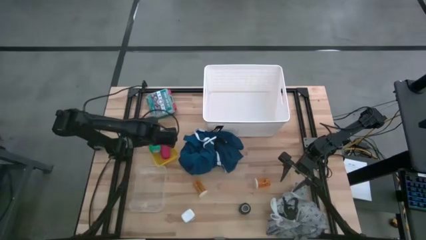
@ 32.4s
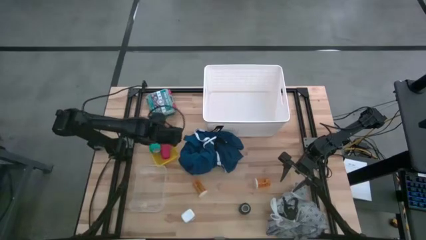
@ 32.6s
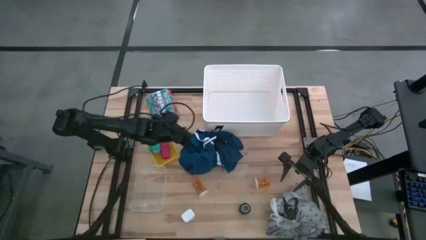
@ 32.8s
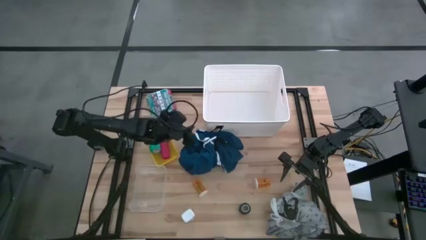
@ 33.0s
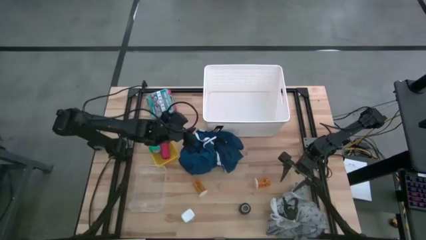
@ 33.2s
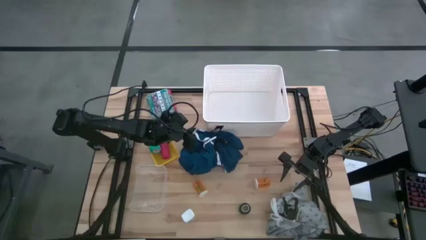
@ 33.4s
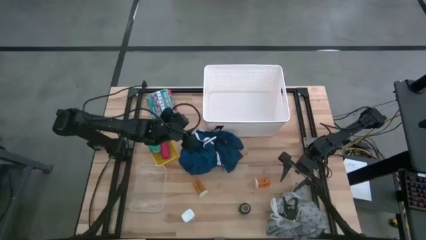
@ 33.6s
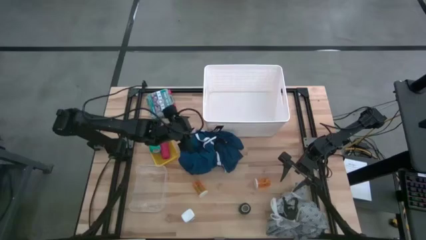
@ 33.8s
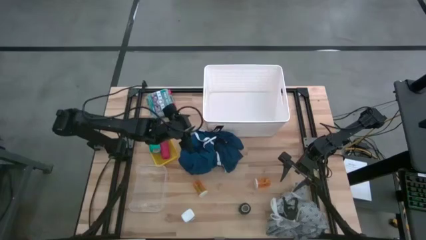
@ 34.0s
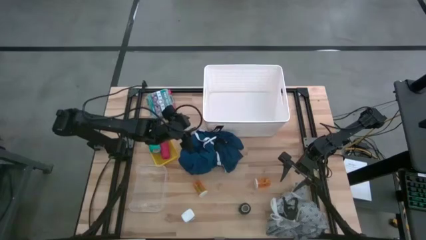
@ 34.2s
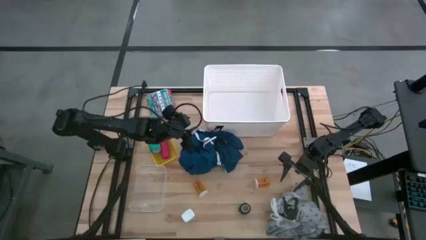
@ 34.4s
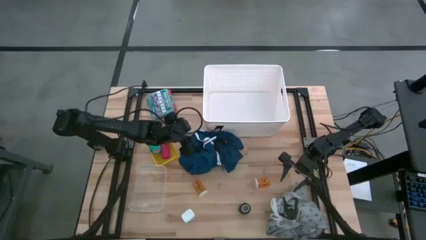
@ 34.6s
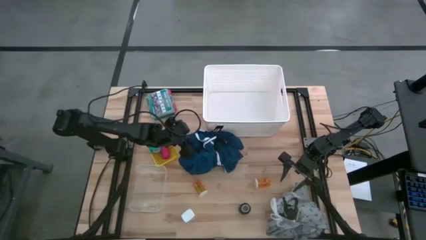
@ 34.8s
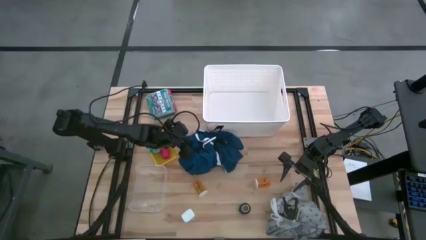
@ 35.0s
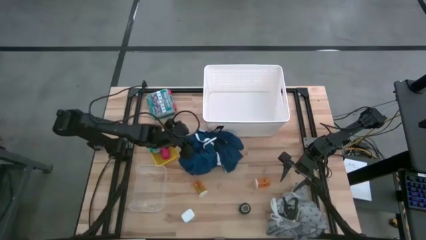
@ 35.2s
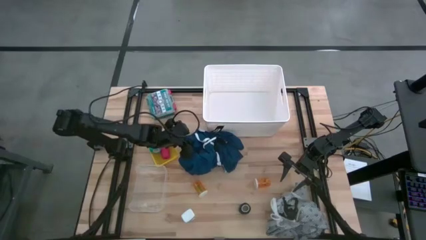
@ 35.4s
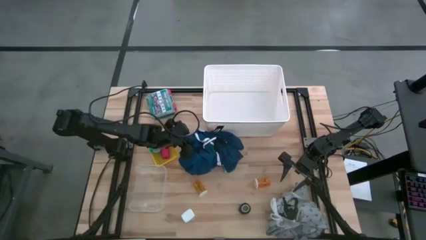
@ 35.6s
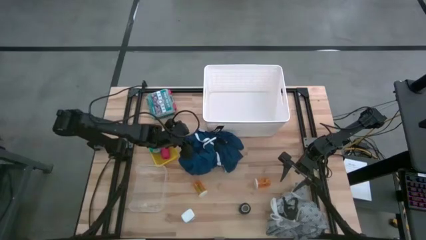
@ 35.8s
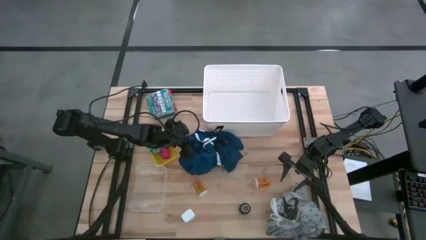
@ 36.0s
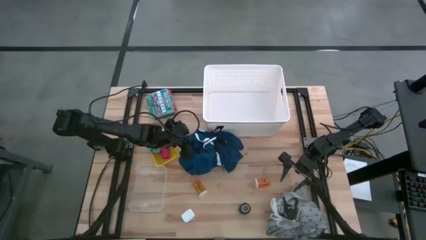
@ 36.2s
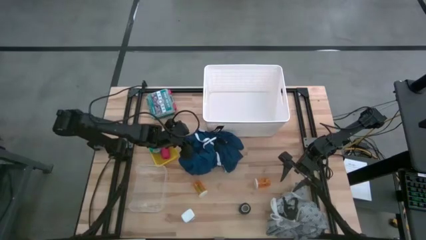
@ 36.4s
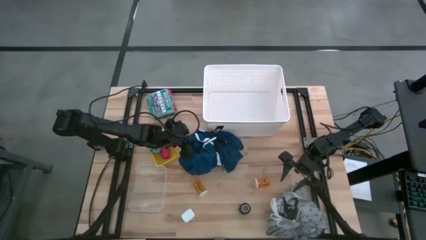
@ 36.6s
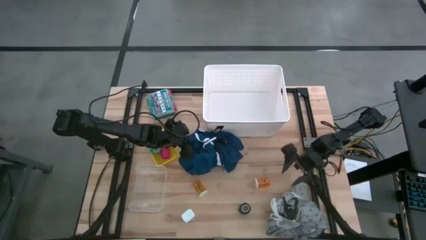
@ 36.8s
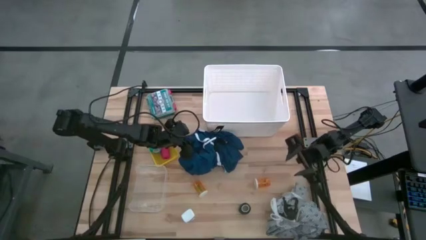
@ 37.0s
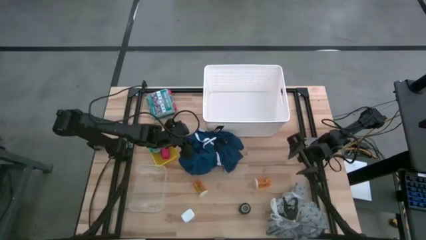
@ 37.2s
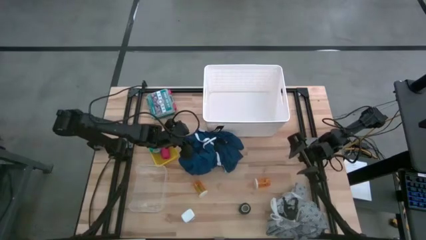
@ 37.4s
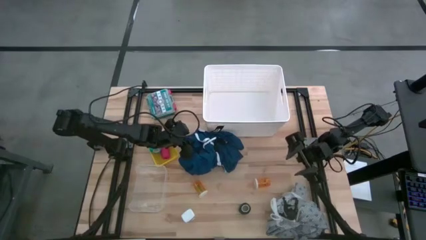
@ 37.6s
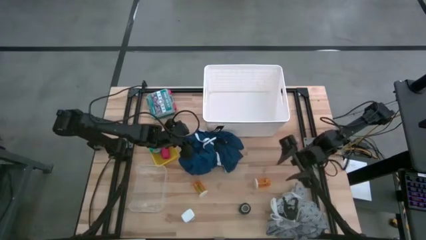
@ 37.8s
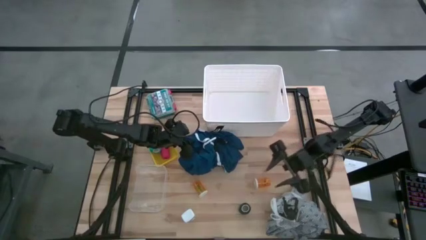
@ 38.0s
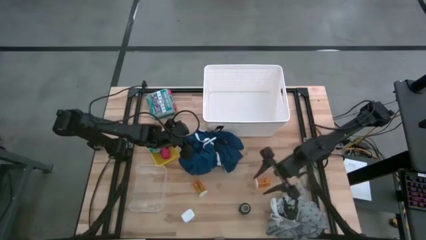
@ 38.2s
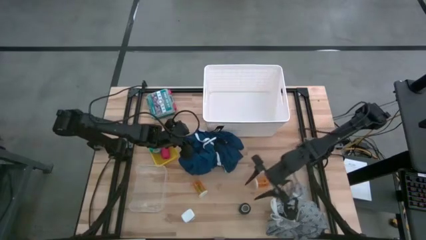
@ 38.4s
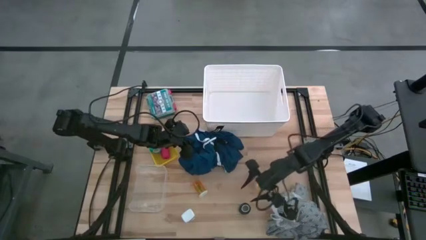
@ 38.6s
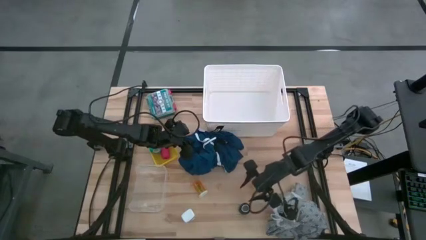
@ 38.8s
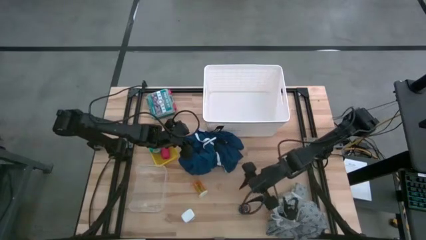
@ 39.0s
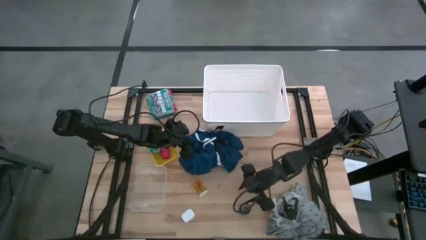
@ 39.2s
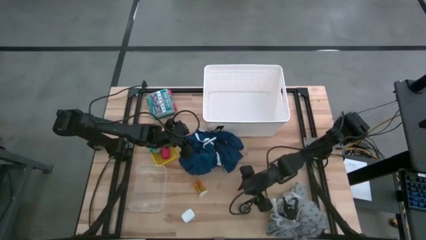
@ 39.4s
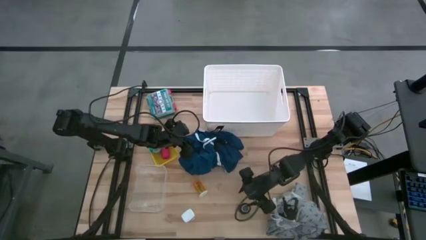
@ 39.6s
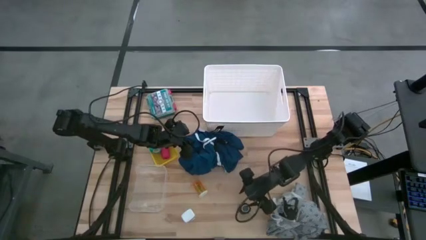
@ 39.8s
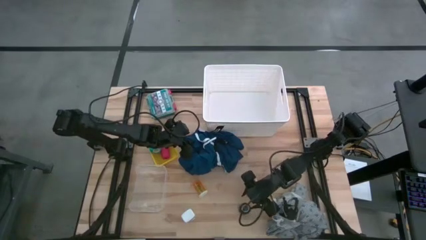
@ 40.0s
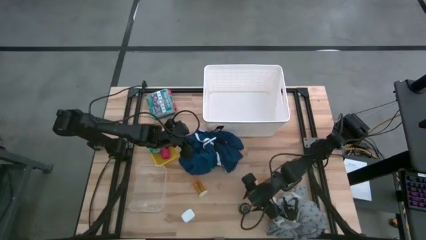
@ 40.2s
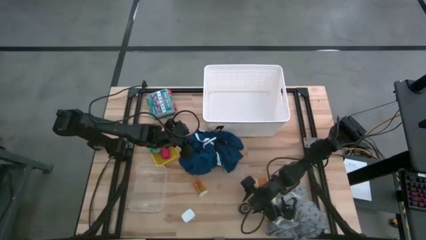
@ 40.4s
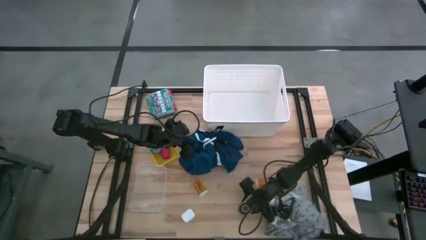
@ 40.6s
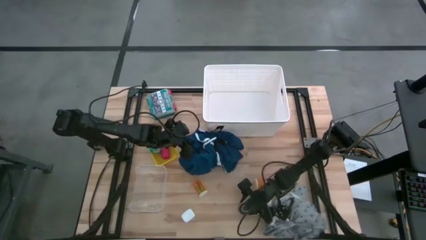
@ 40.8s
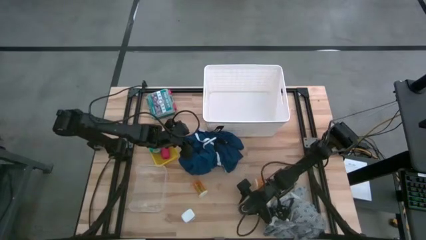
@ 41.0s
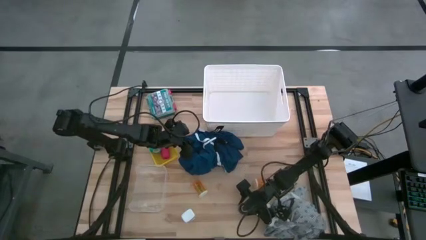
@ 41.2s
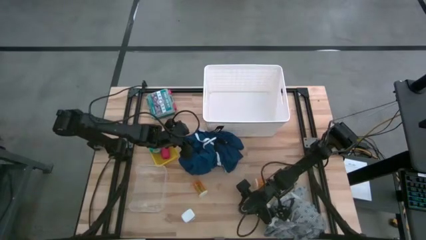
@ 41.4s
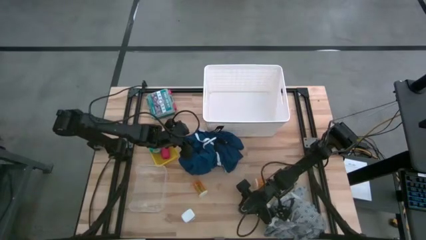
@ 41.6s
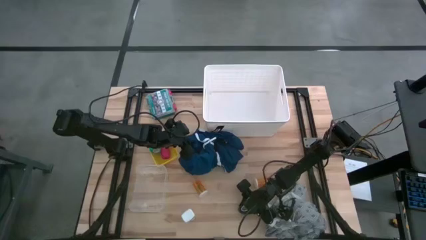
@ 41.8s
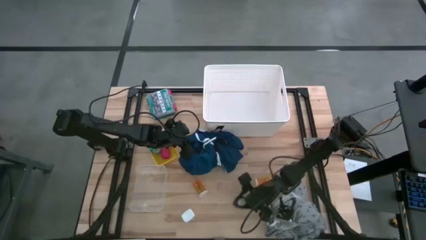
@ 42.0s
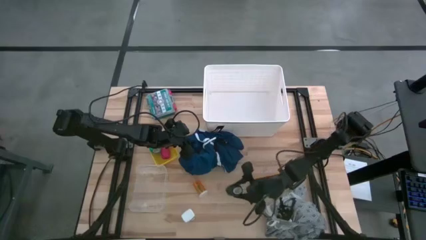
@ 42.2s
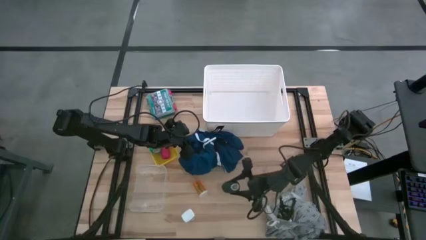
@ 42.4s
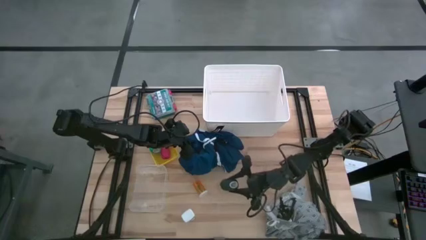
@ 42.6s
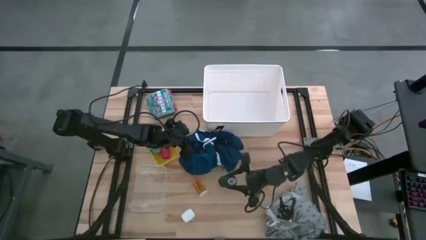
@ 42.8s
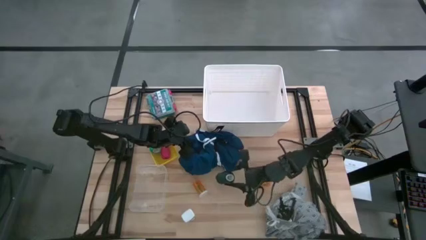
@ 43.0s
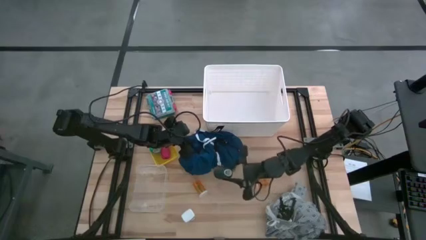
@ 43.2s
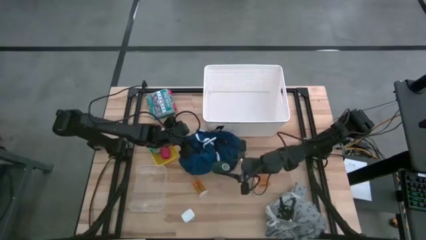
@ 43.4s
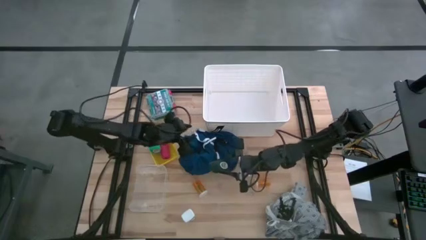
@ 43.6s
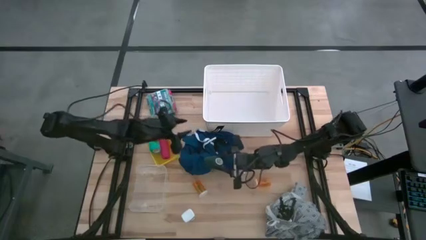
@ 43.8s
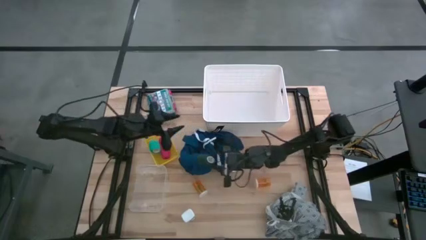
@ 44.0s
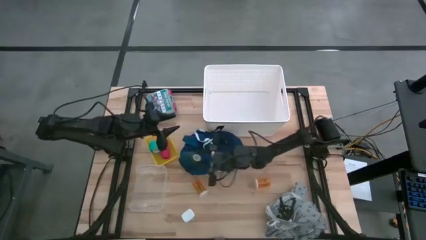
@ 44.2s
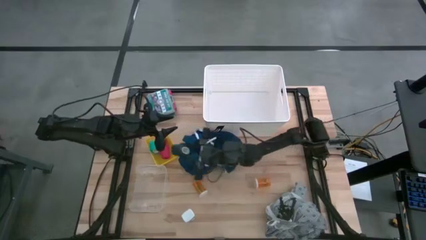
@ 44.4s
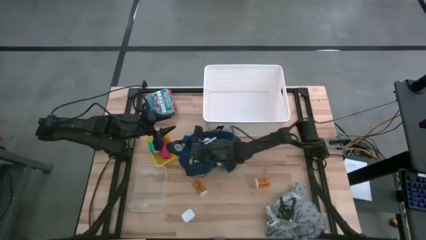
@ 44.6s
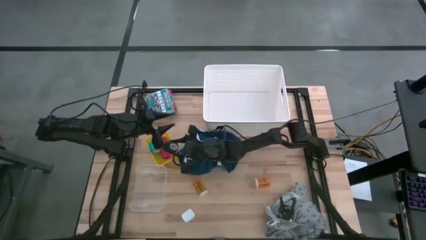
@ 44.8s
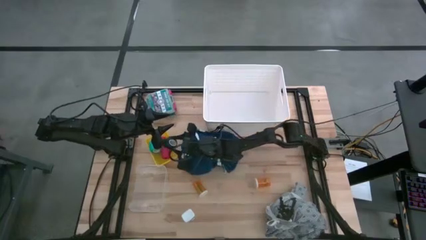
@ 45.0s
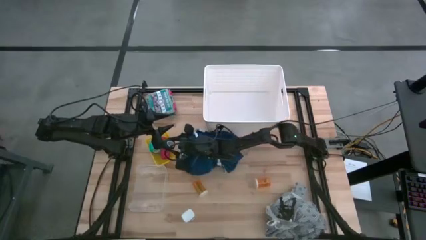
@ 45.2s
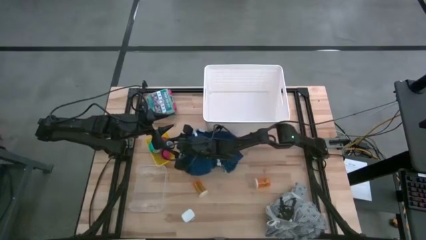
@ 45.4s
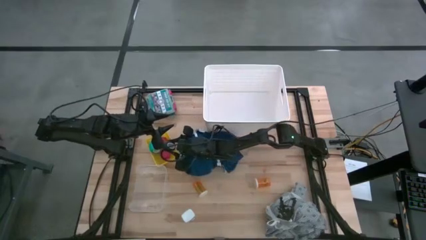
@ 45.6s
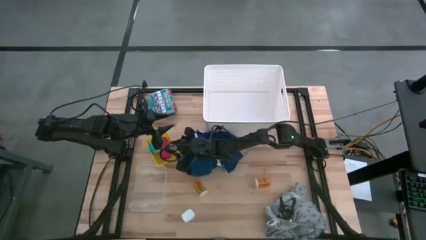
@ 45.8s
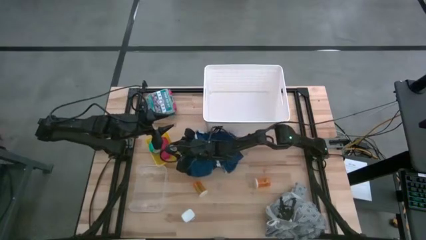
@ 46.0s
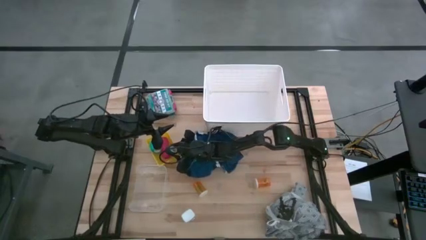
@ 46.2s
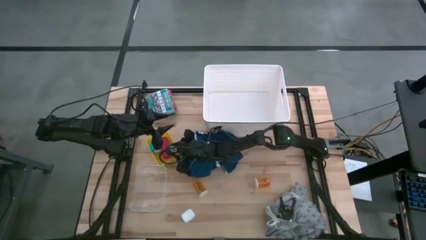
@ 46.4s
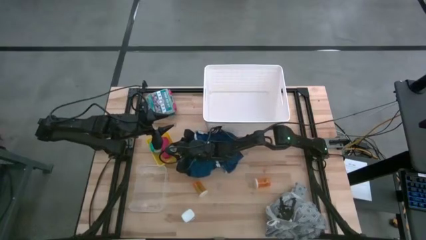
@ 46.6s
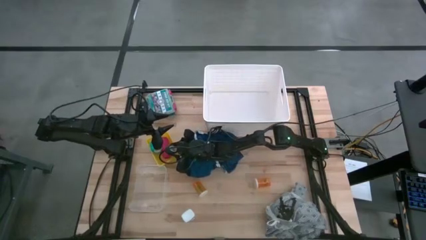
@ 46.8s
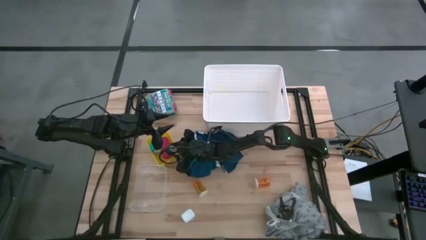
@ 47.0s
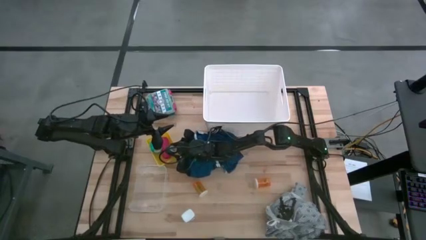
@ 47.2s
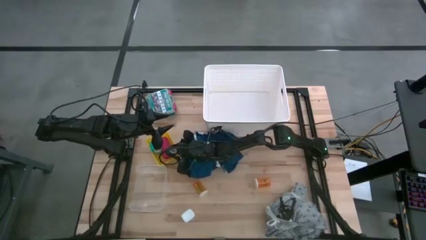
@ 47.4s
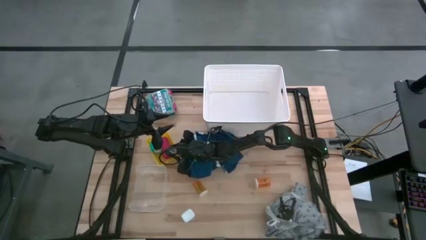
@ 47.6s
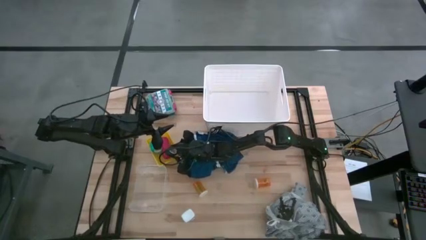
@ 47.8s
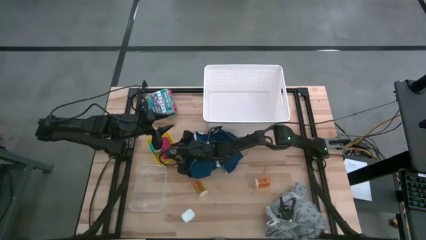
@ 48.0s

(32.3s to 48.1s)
Task: Pick & place medical supplies in basket/bin
Put the black bandage into the yellow bin
